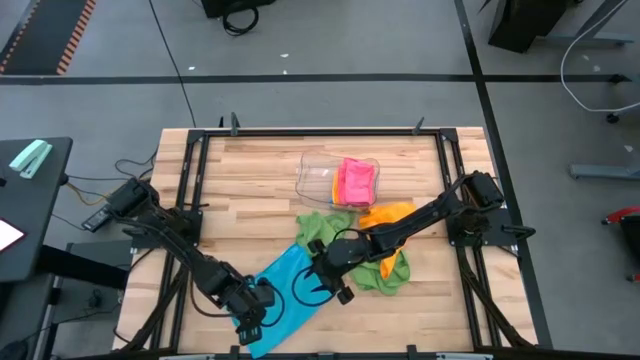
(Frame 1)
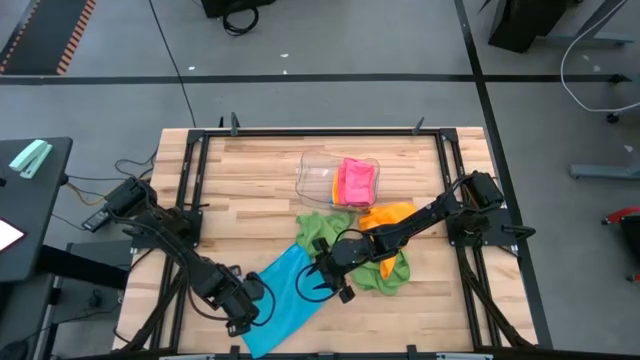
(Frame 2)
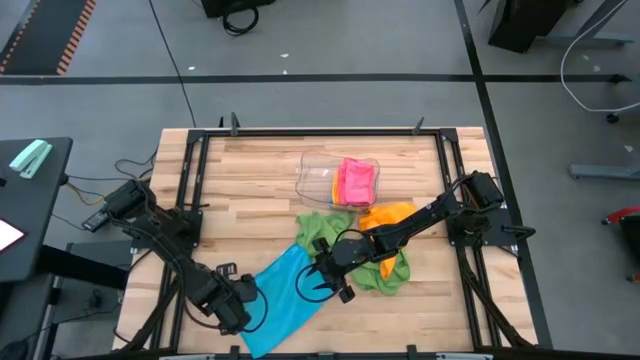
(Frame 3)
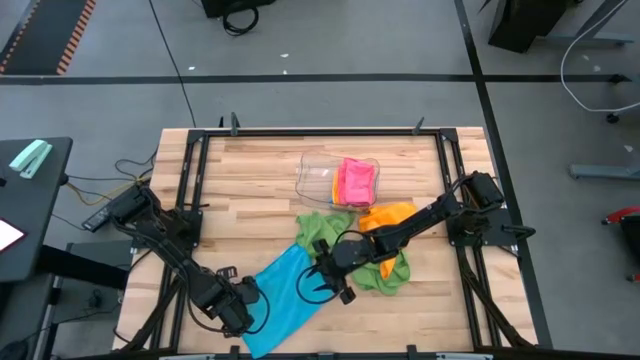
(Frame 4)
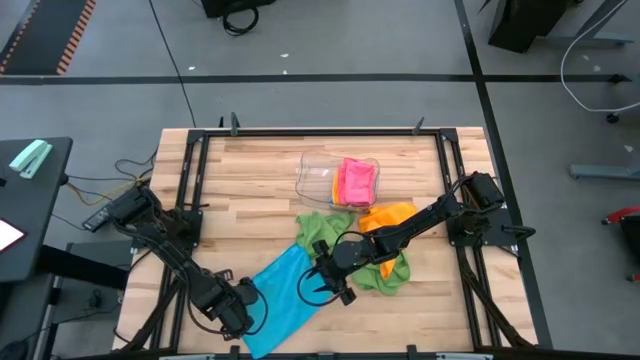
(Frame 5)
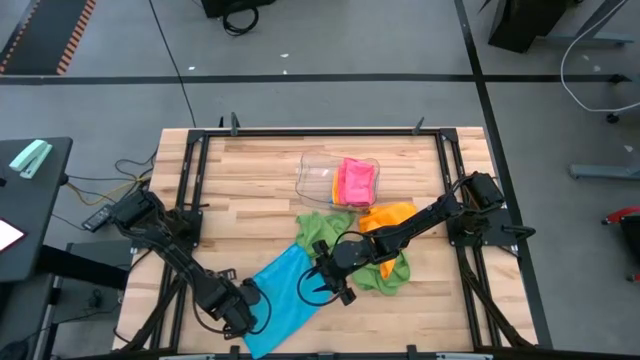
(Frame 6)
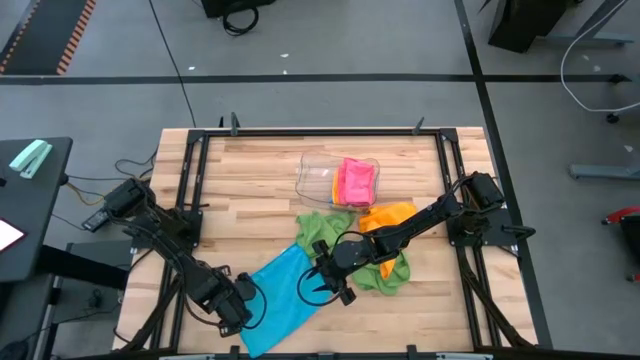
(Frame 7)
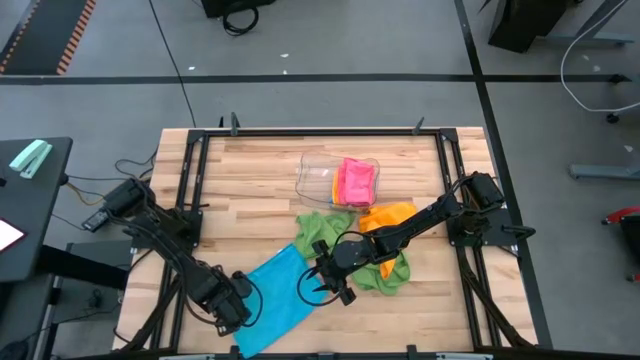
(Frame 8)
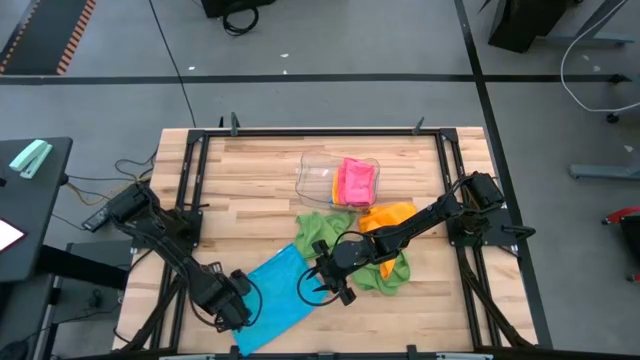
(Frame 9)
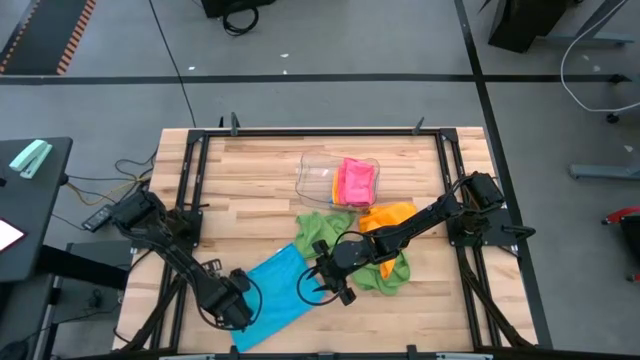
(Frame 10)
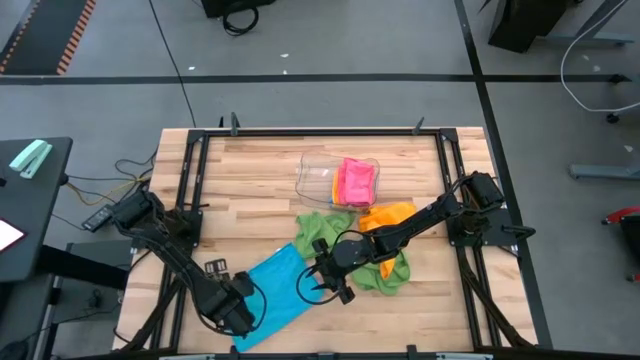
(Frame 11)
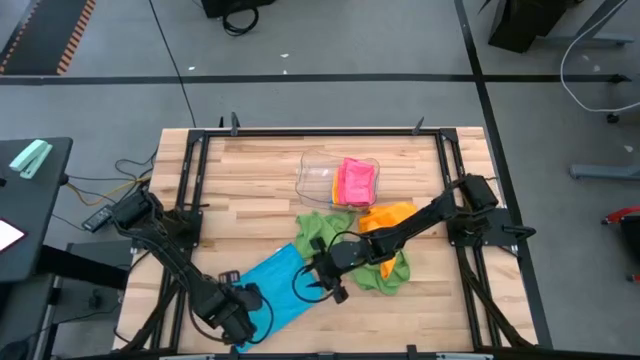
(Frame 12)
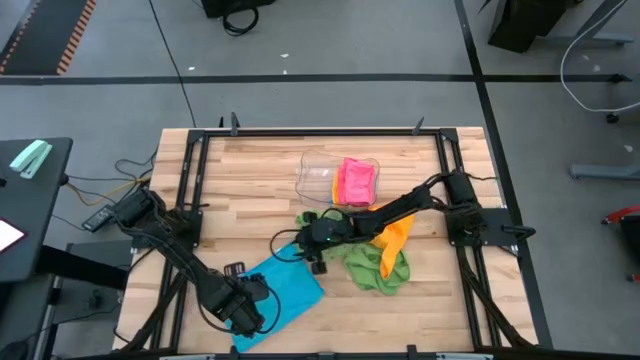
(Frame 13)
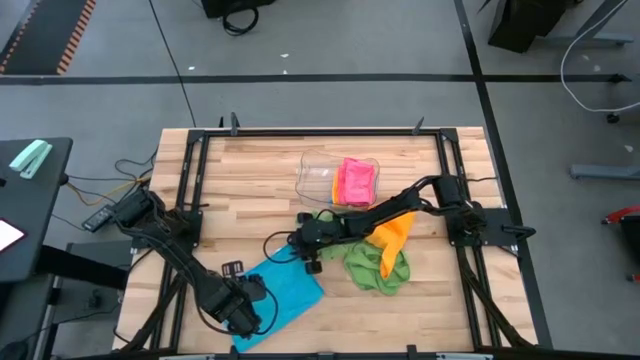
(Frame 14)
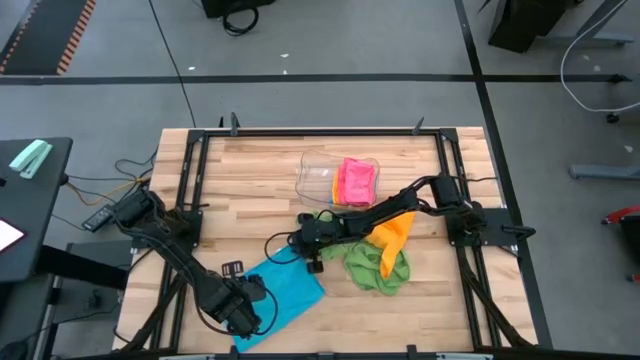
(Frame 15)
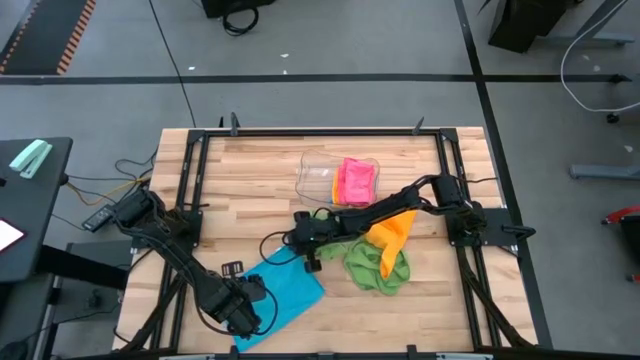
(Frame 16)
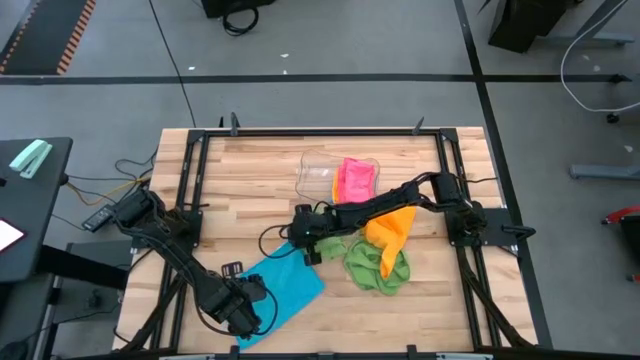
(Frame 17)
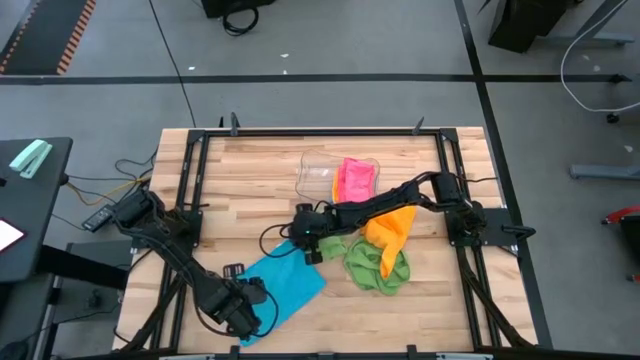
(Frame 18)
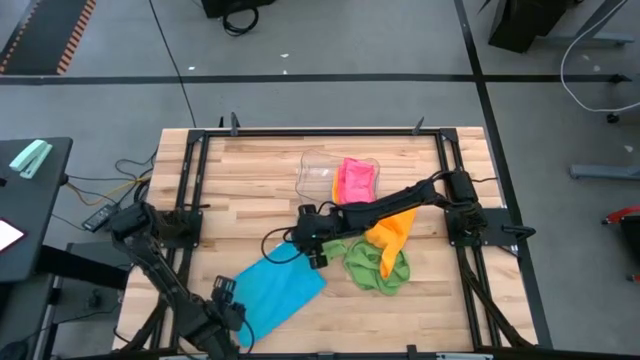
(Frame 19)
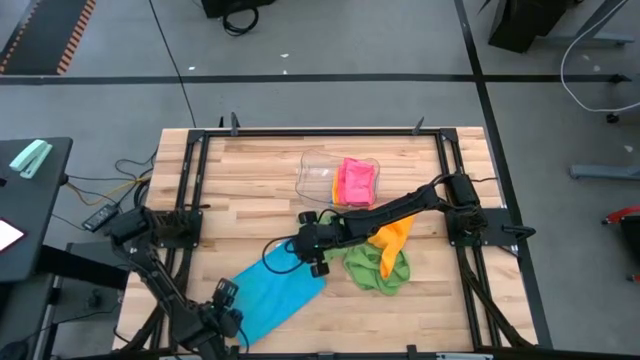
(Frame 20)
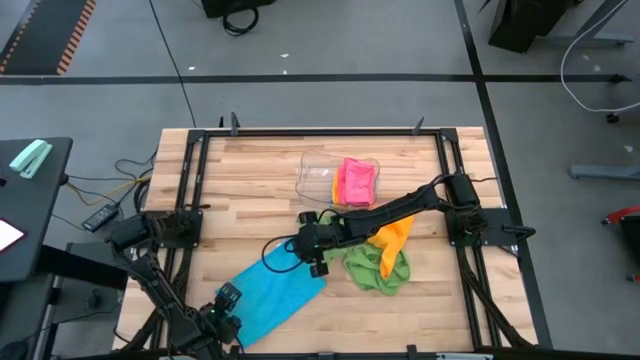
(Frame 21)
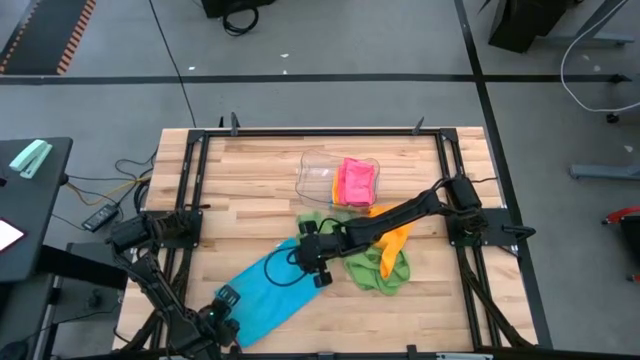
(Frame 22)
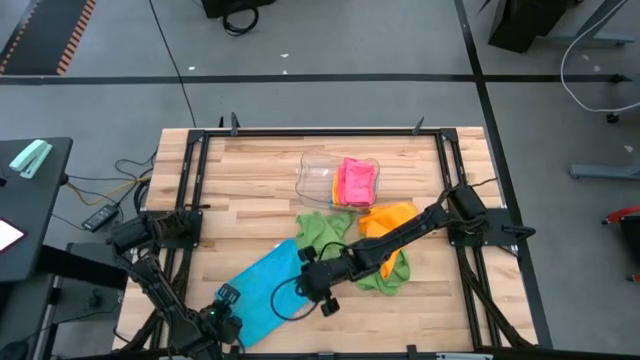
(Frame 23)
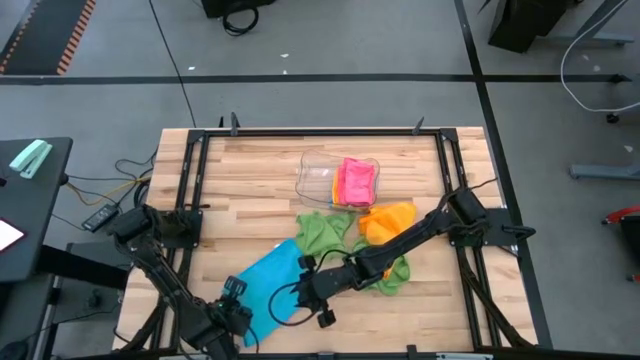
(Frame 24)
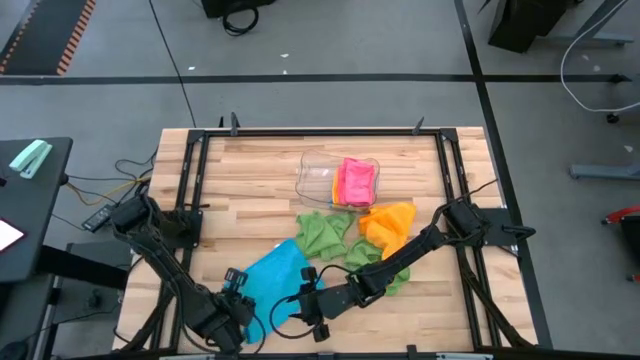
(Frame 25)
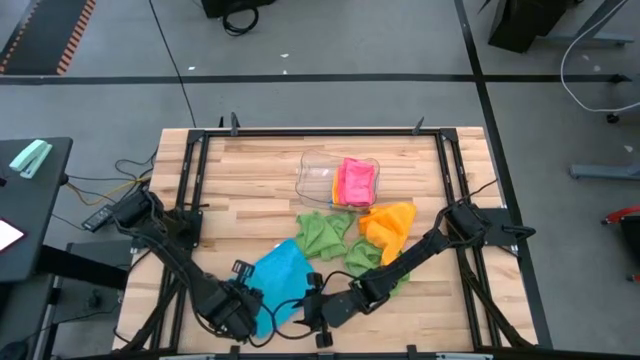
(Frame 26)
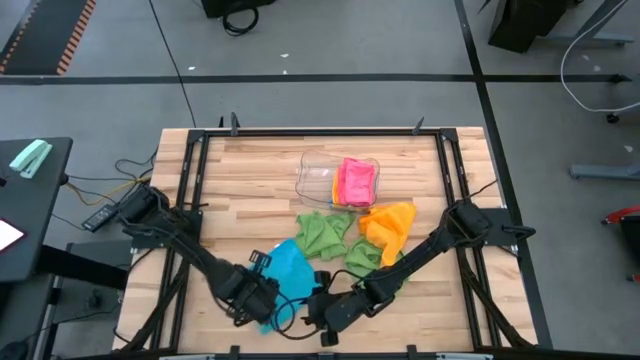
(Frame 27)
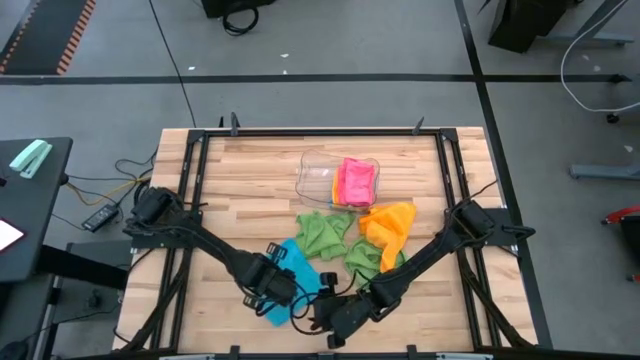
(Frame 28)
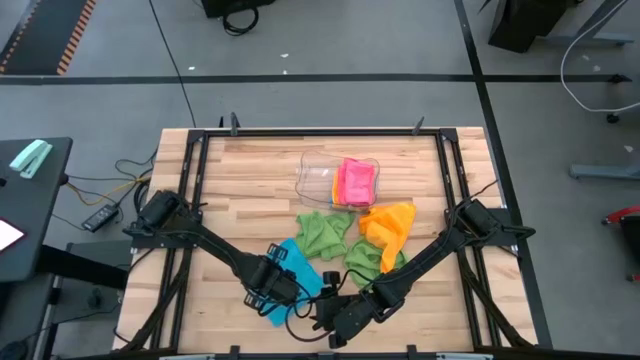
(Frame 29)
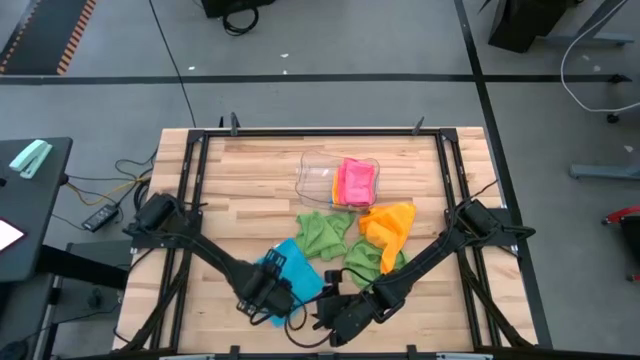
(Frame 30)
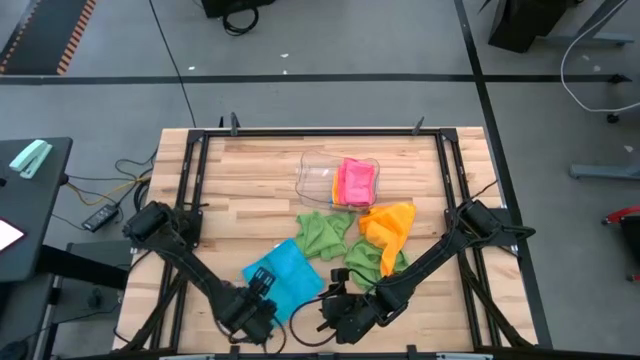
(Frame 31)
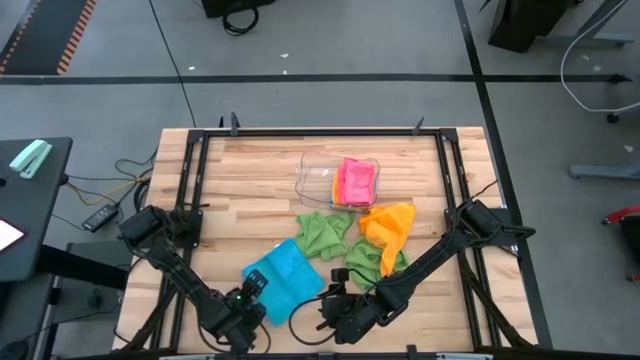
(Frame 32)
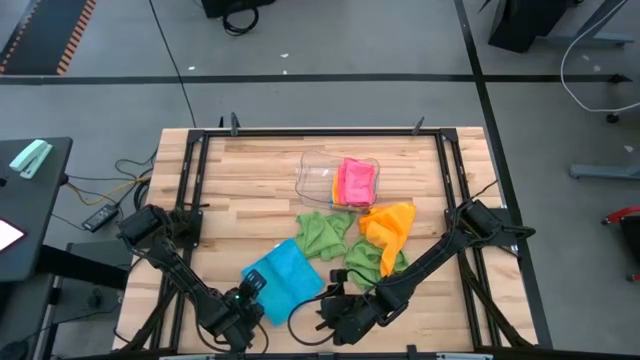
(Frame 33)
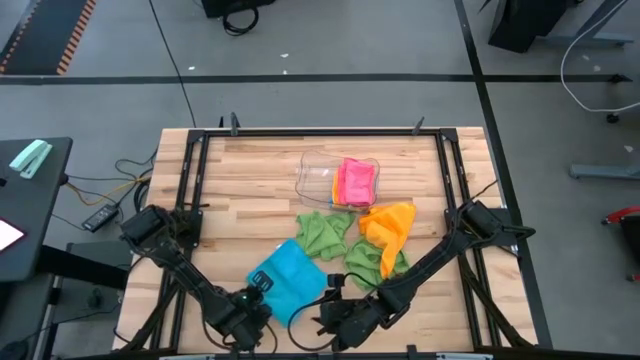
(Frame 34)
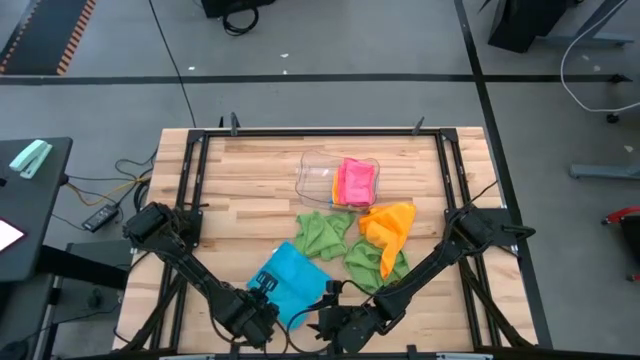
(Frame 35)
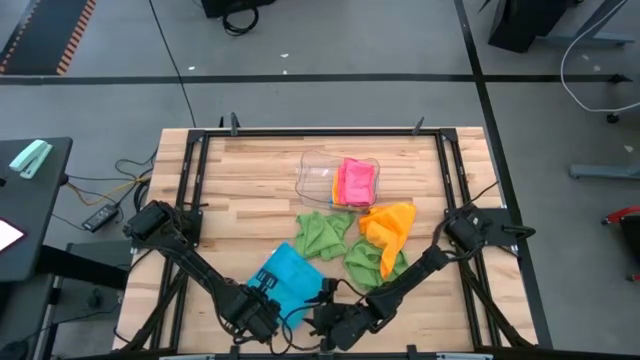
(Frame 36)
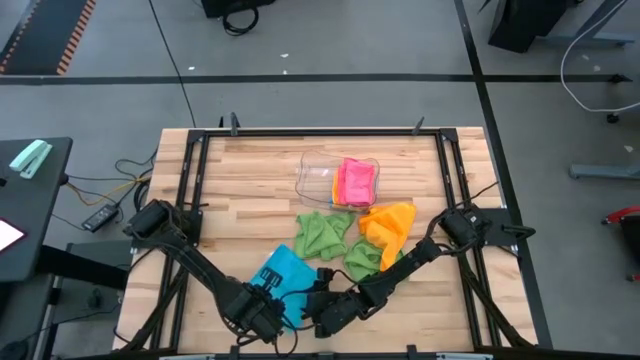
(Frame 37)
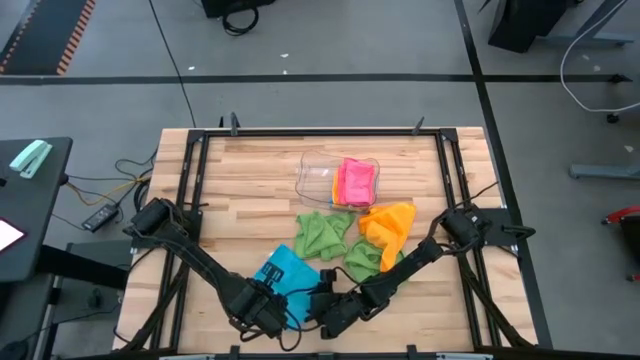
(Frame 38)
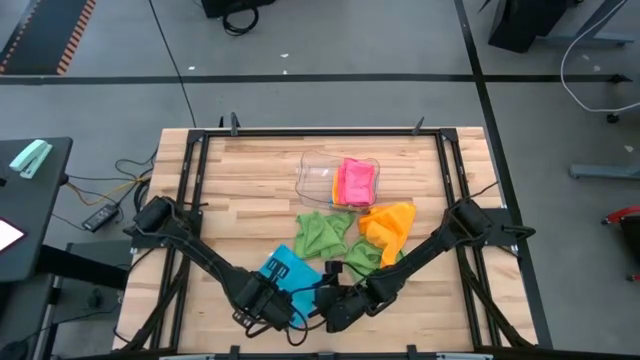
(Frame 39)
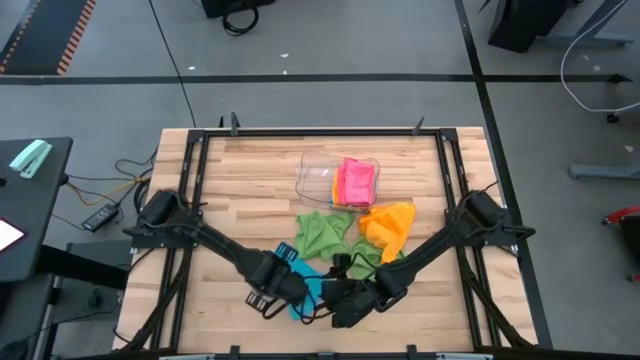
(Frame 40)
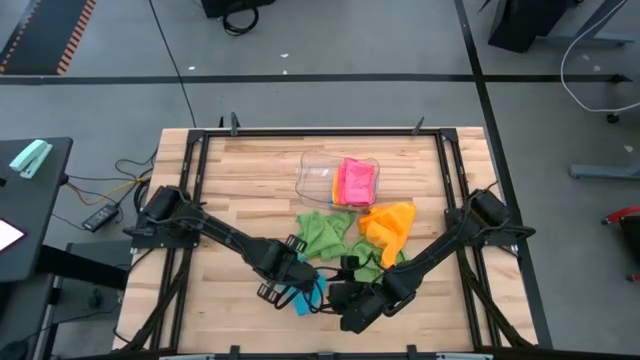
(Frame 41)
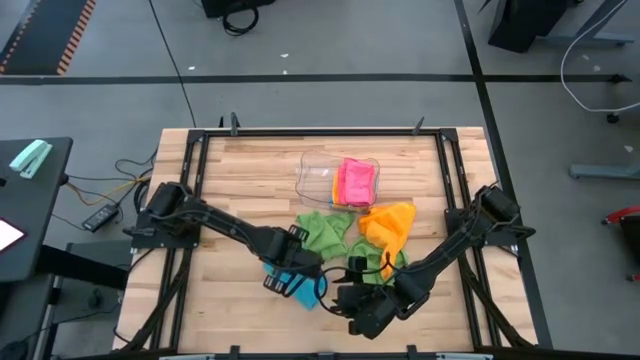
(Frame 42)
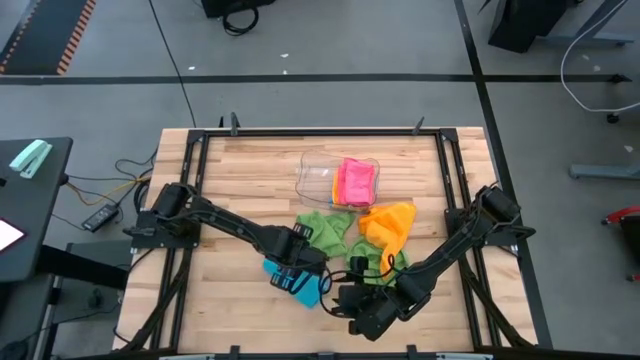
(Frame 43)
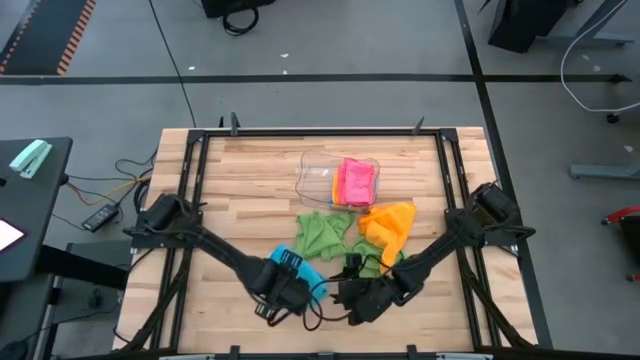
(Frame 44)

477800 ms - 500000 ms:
Task: Fold microfiber towels
Fold the blue microfiber cloth
